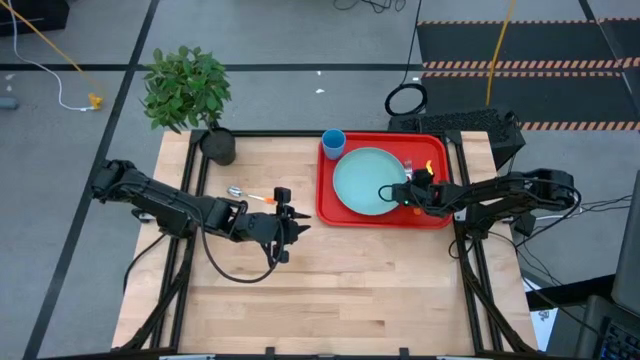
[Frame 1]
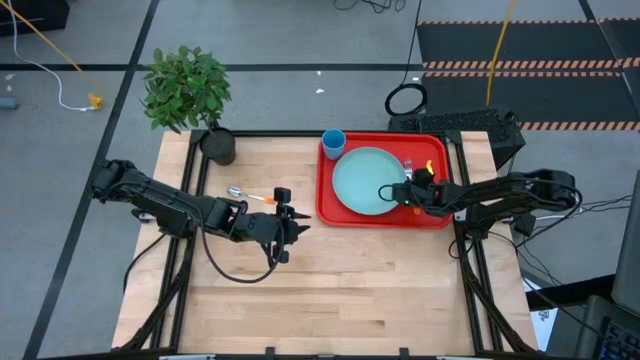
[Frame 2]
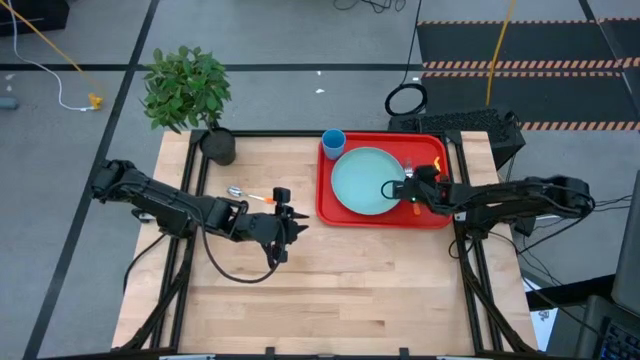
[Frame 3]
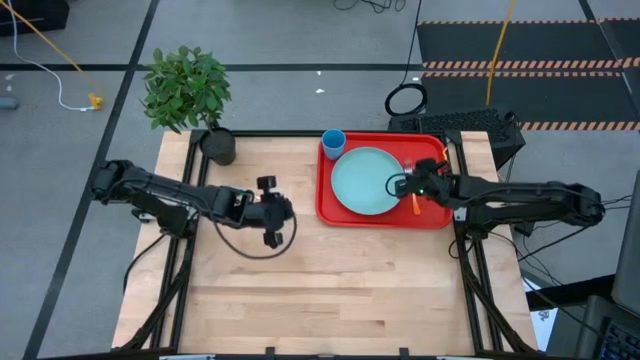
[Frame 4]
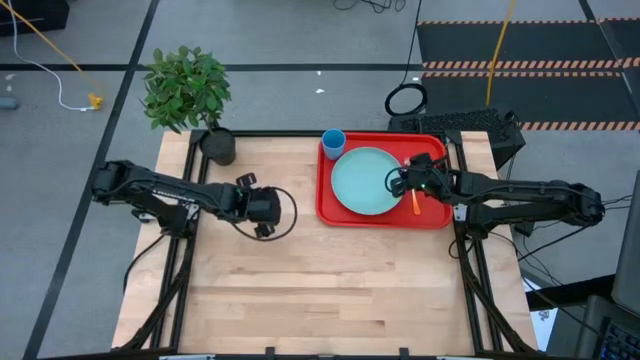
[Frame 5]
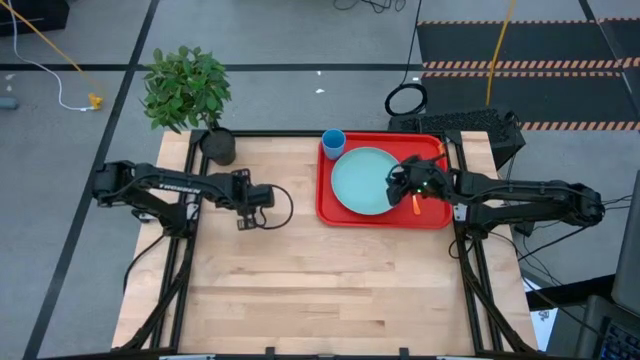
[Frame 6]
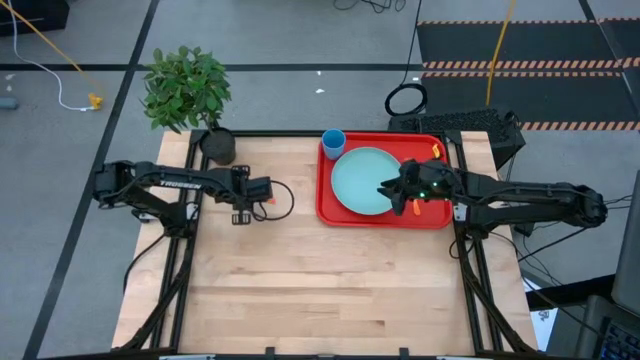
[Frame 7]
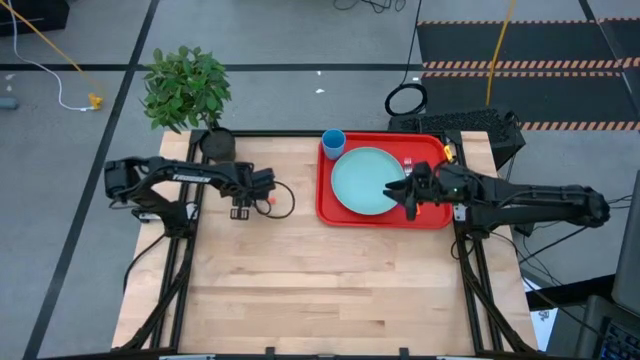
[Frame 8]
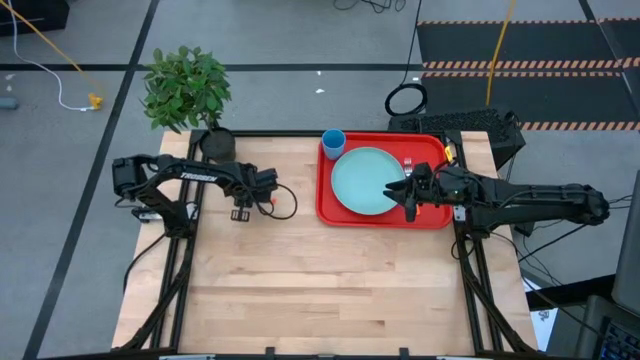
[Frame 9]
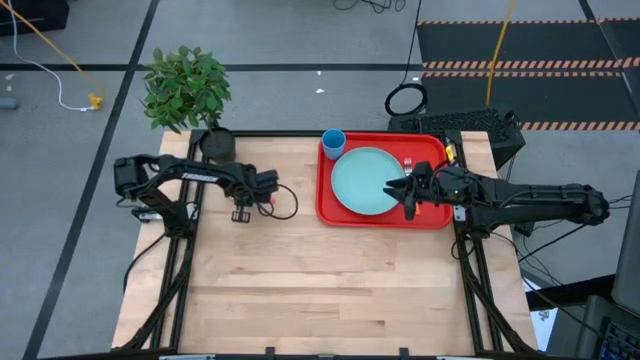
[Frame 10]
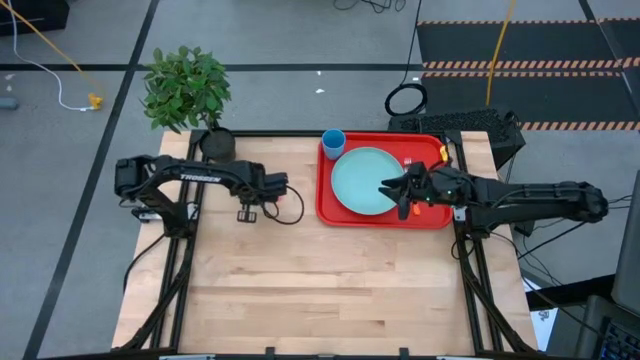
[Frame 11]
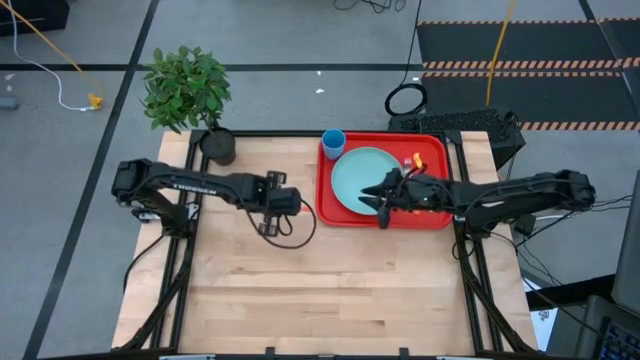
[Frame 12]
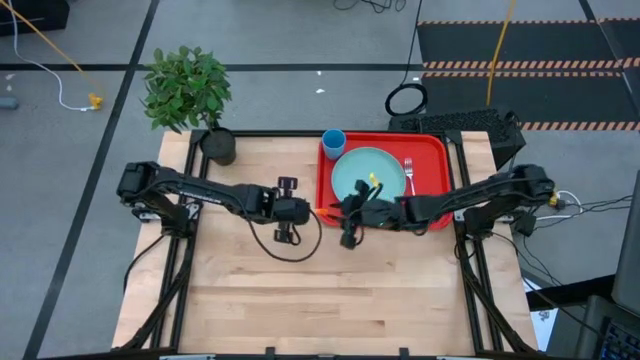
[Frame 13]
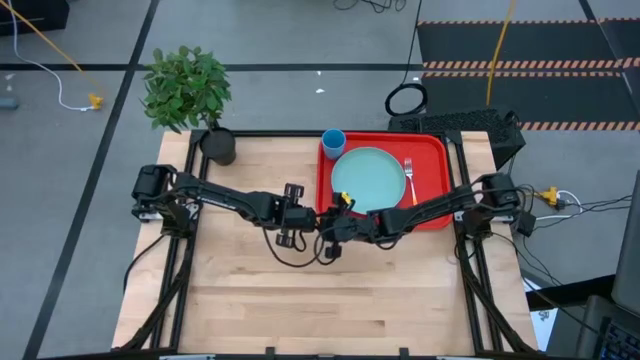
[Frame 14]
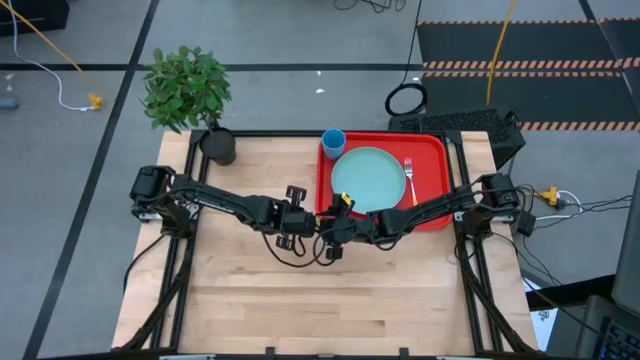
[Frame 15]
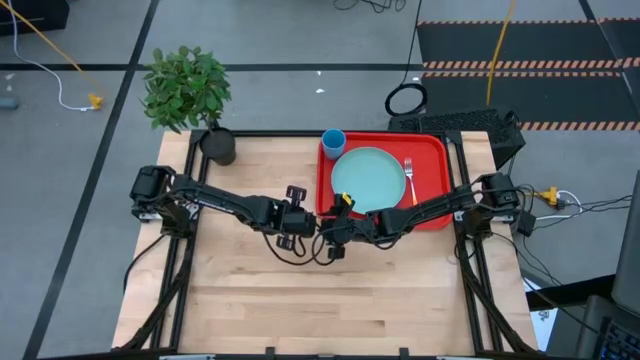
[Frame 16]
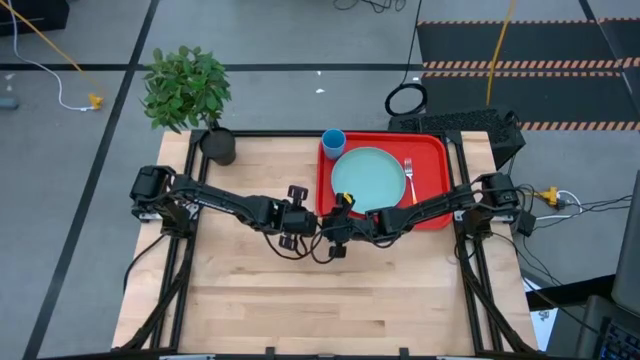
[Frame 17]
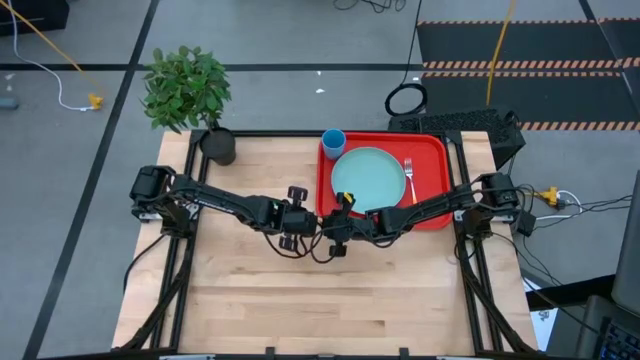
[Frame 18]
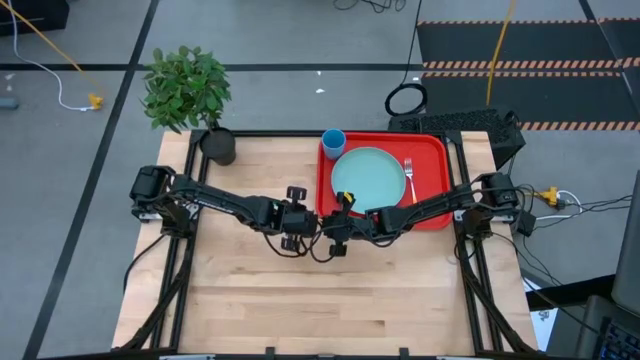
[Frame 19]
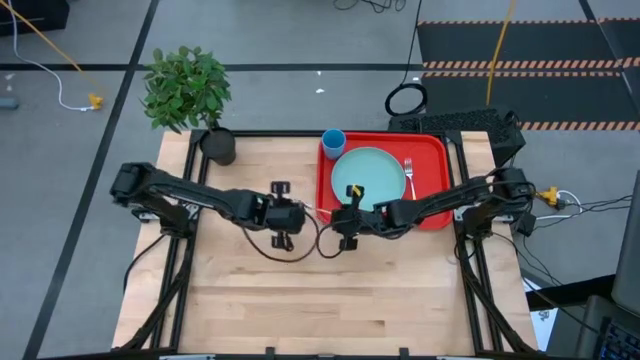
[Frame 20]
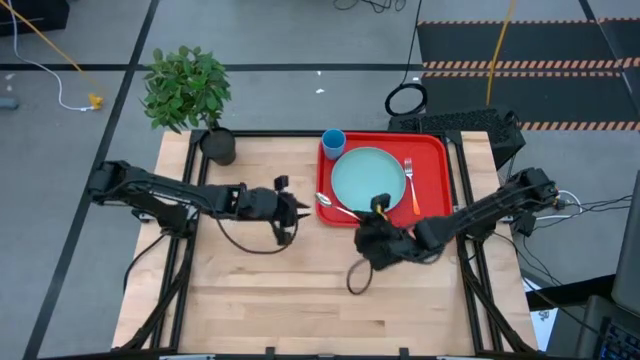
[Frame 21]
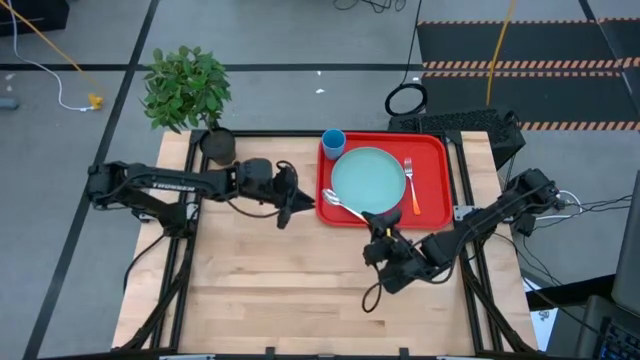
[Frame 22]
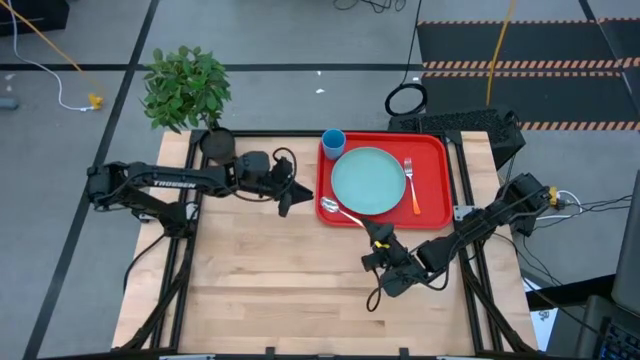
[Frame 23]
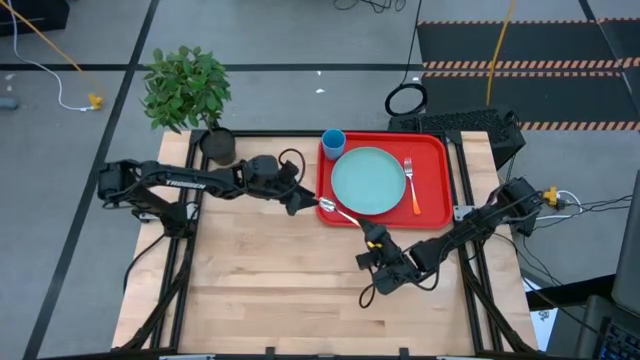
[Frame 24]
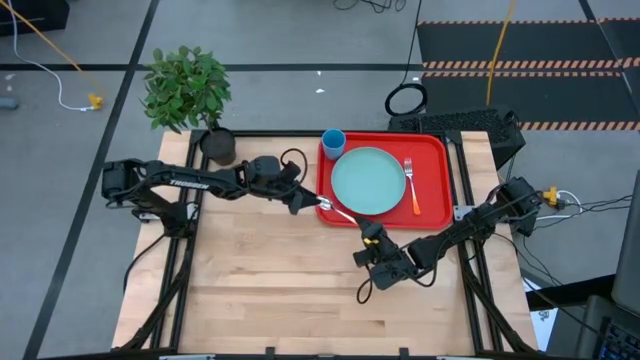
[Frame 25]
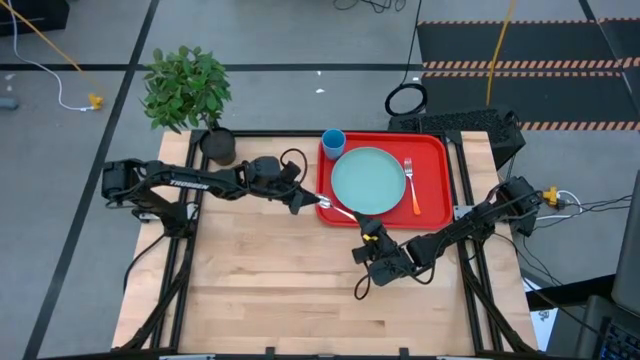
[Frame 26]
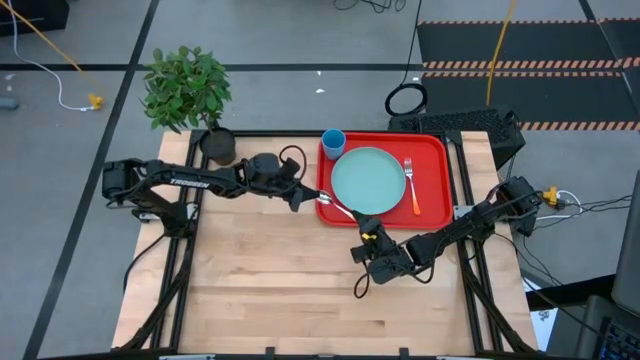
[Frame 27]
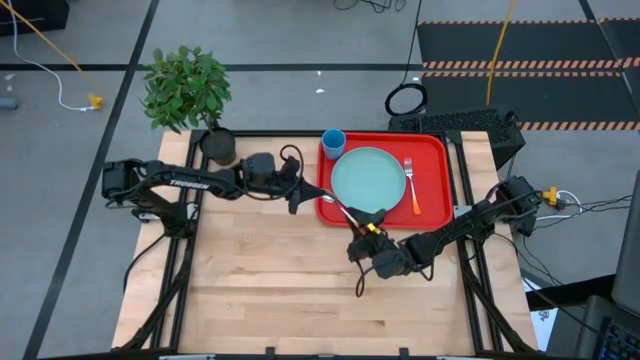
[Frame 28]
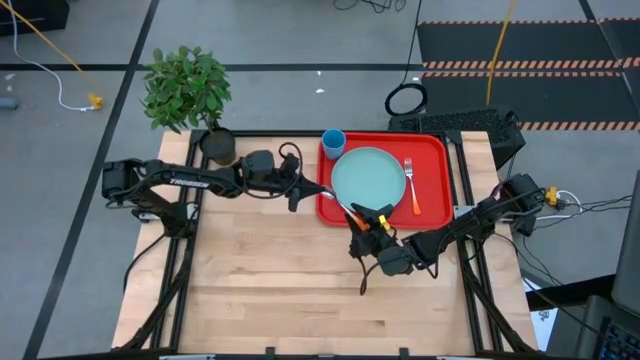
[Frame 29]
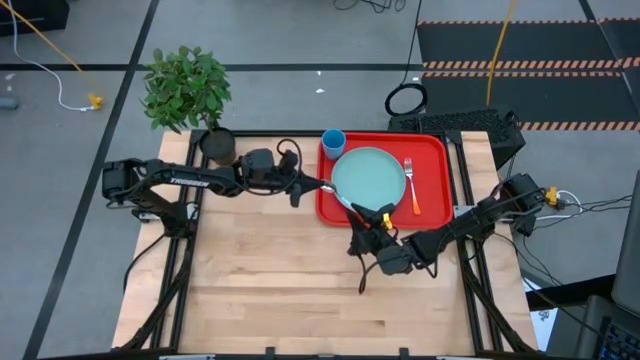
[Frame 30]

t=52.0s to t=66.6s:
Task: Pick and place plate/cup/fork/spoon on tray
Put the orange spoon on the red tray to the right of the orange fork

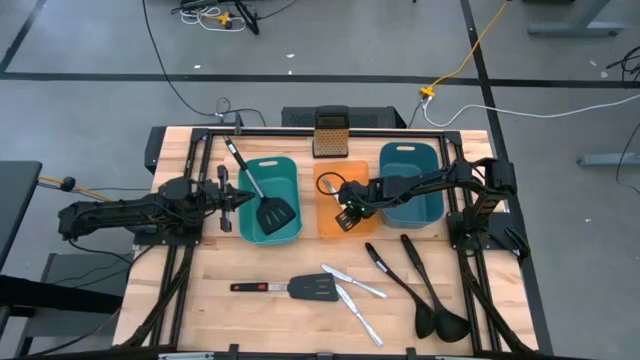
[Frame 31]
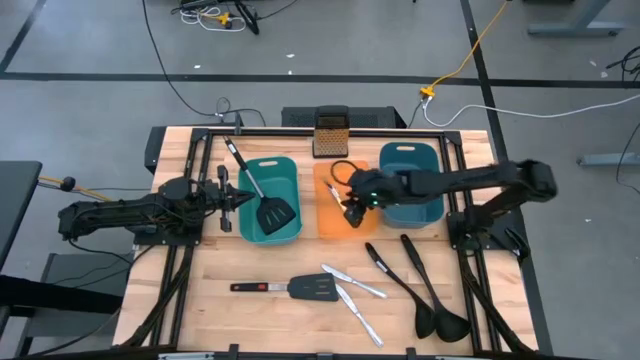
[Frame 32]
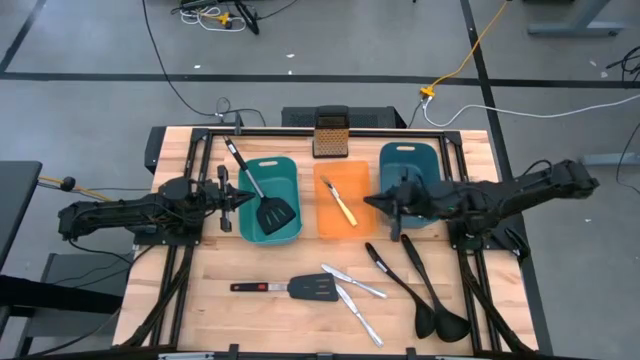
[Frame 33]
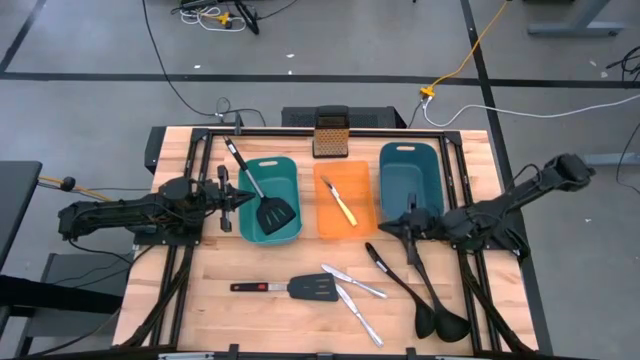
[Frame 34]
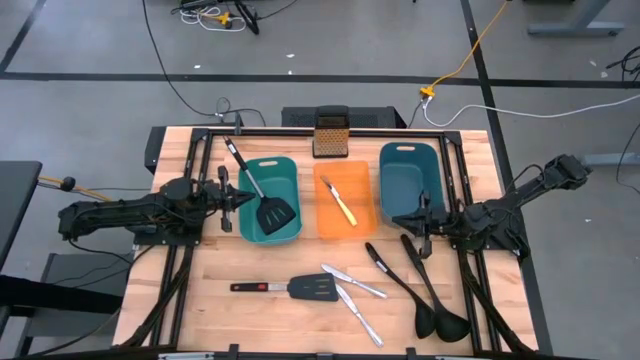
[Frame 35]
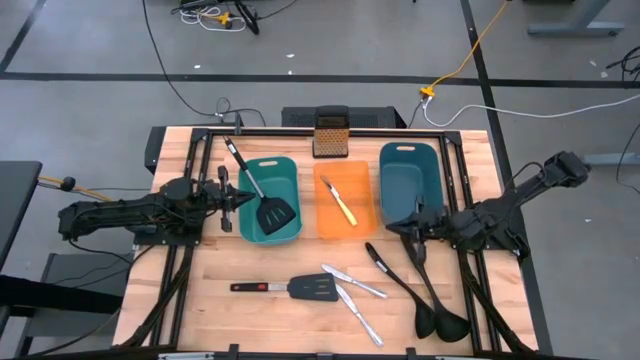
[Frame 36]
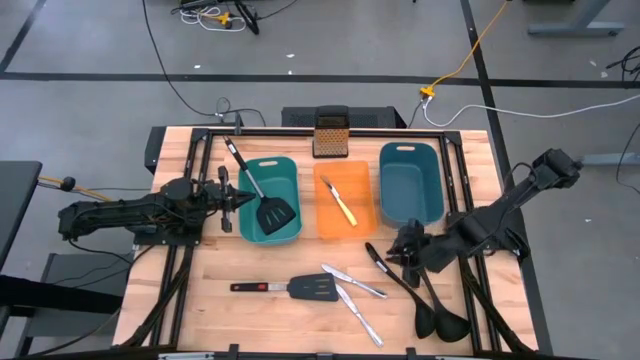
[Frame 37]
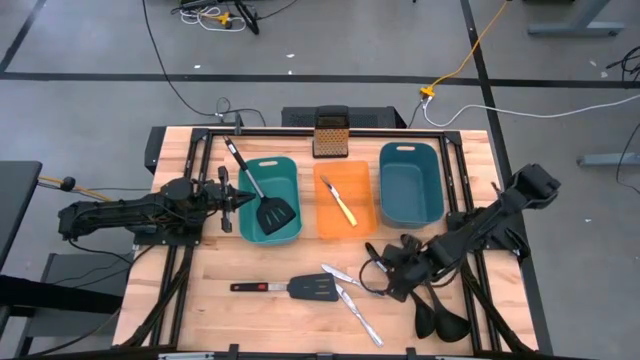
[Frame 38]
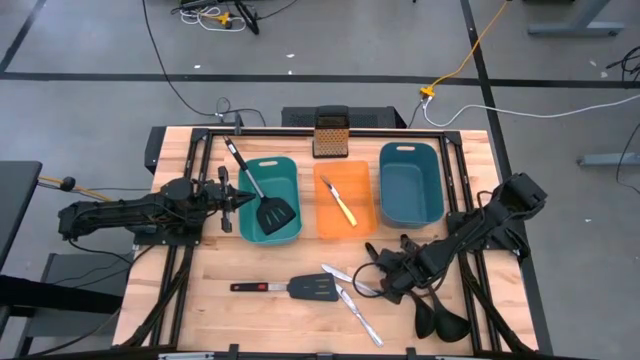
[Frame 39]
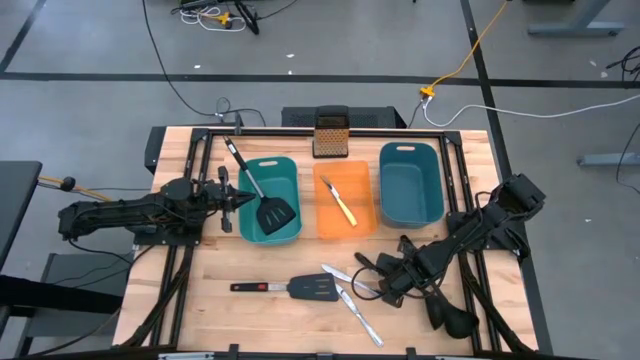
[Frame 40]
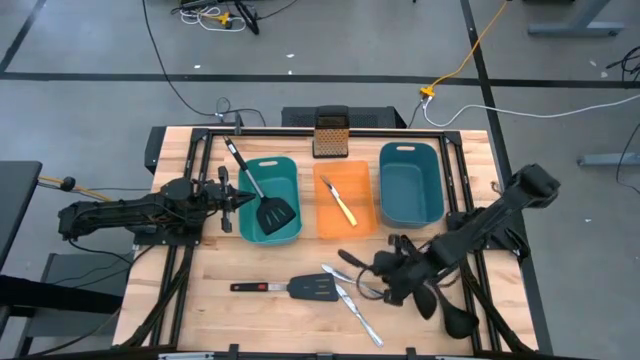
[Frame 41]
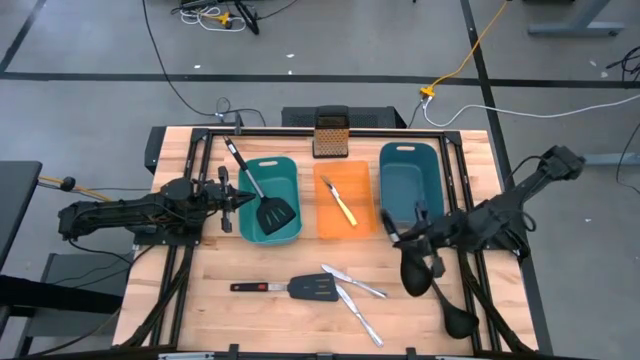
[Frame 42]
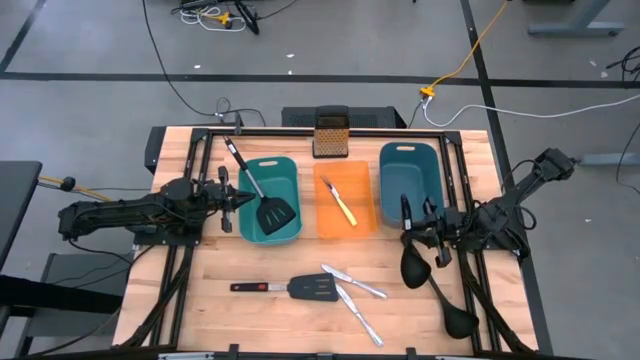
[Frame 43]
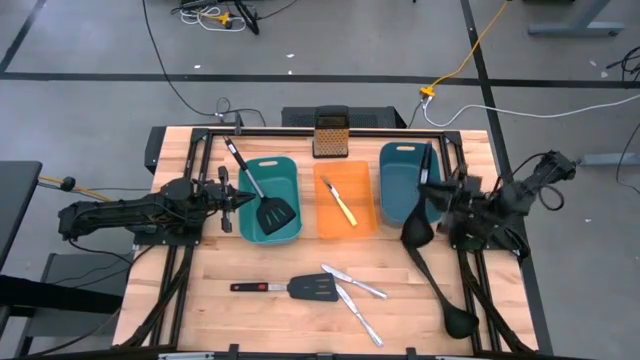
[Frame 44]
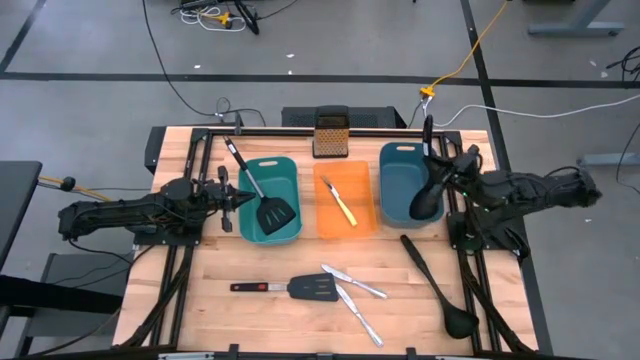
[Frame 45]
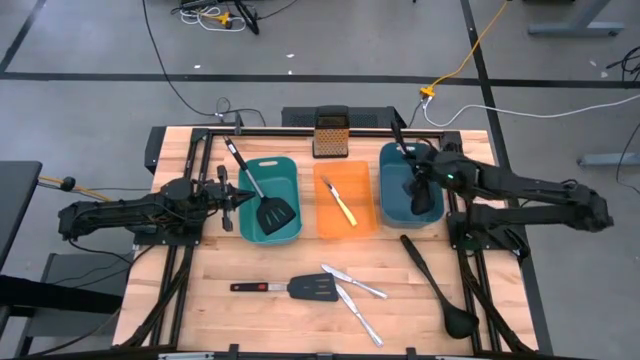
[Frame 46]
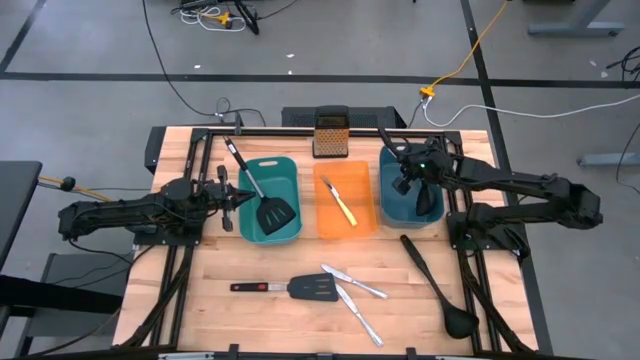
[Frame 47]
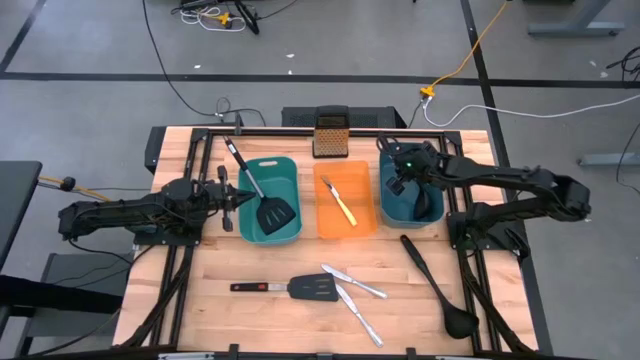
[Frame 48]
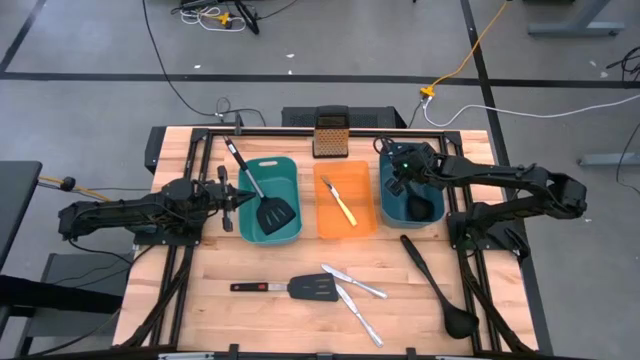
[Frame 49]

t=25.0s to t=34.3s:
Task: Pick & Place Kitchen Items
Put the left black serving spoon into the blue bin
